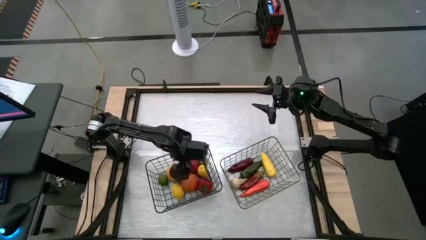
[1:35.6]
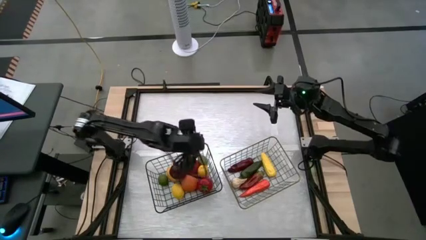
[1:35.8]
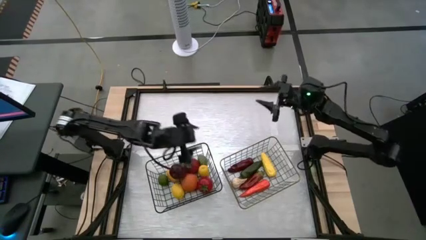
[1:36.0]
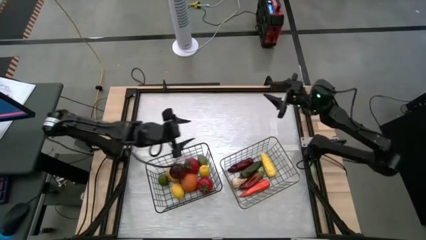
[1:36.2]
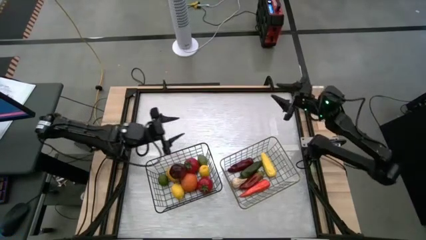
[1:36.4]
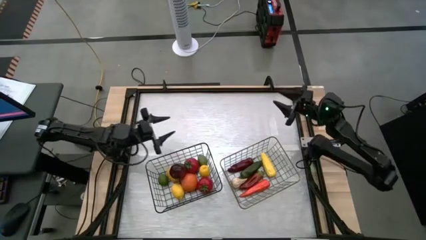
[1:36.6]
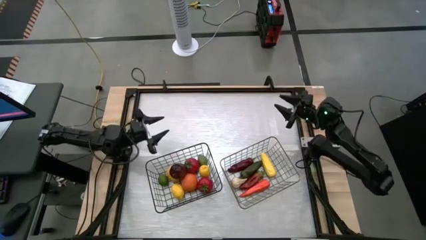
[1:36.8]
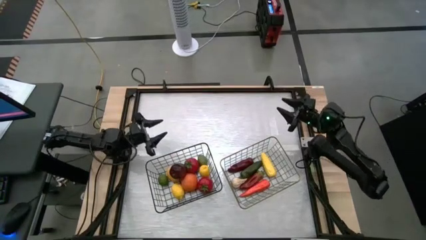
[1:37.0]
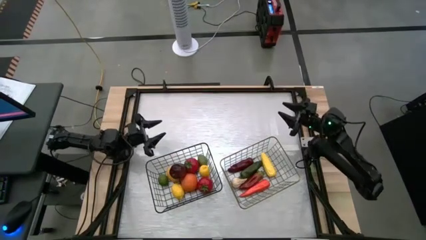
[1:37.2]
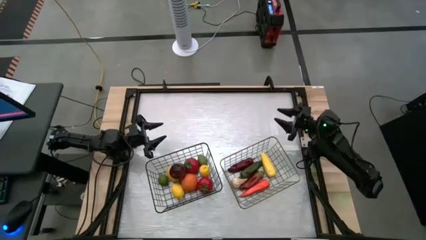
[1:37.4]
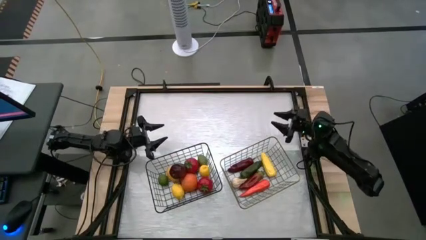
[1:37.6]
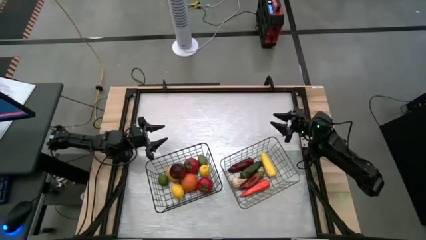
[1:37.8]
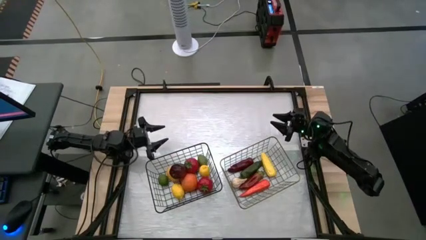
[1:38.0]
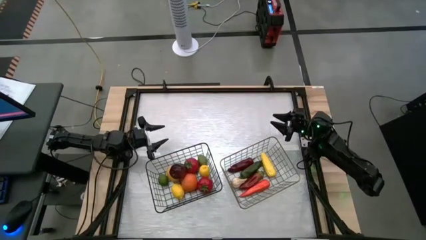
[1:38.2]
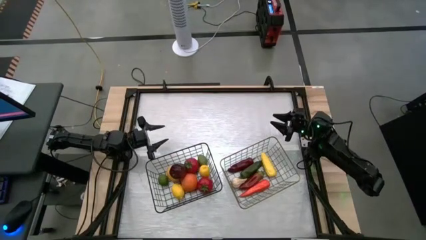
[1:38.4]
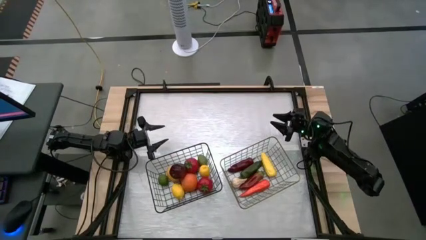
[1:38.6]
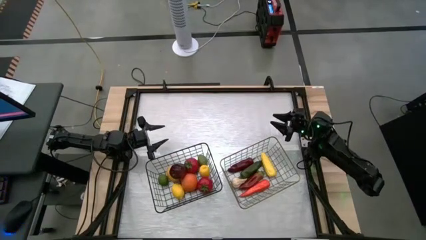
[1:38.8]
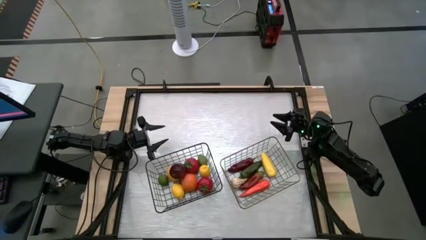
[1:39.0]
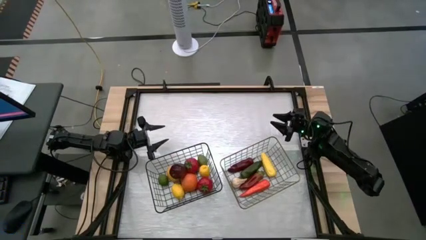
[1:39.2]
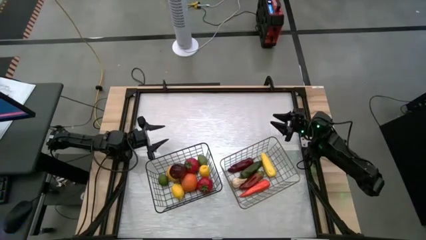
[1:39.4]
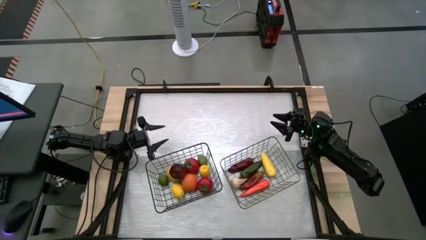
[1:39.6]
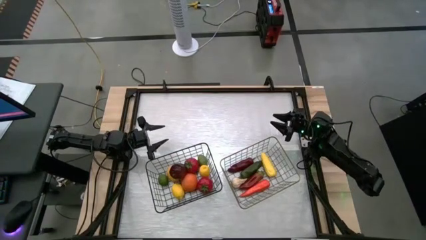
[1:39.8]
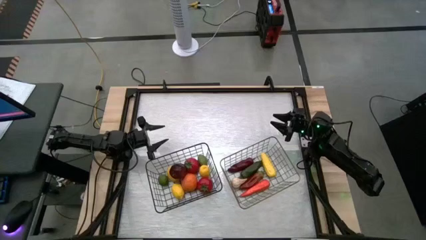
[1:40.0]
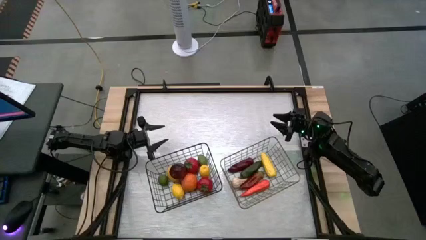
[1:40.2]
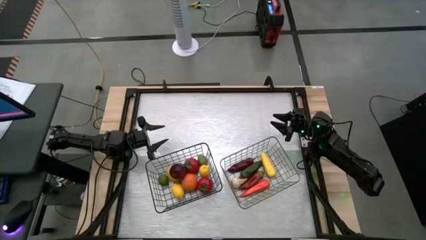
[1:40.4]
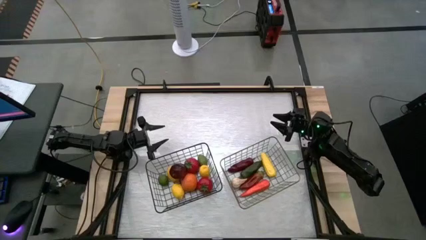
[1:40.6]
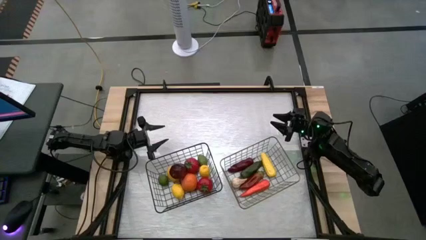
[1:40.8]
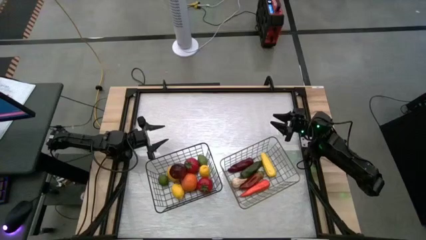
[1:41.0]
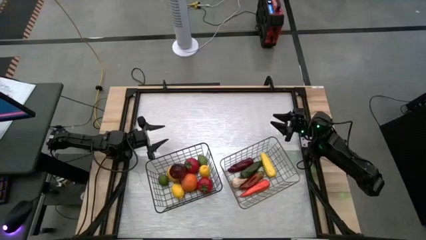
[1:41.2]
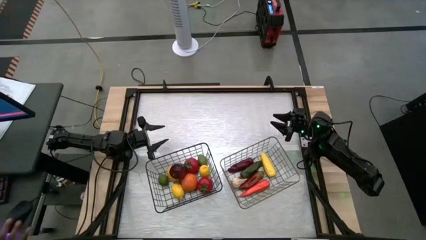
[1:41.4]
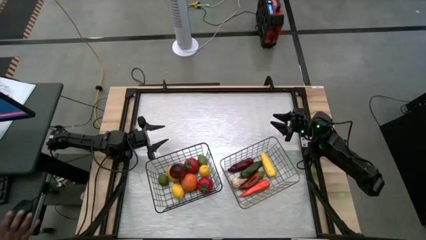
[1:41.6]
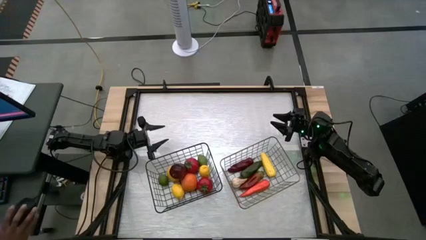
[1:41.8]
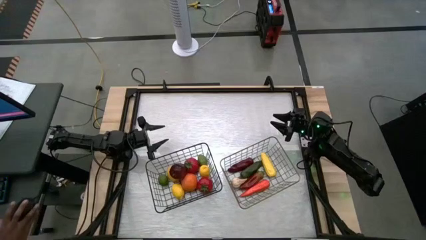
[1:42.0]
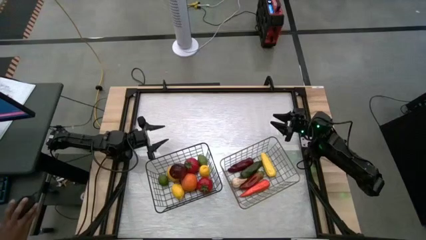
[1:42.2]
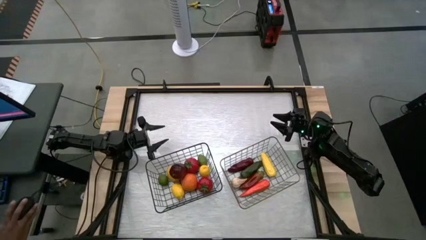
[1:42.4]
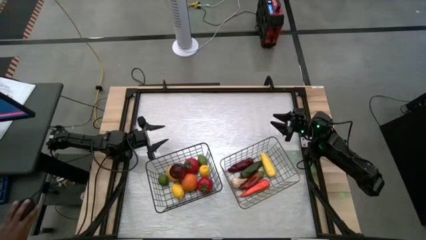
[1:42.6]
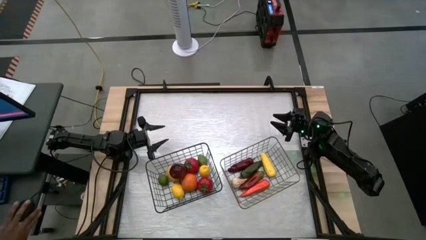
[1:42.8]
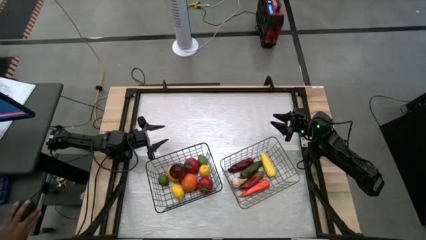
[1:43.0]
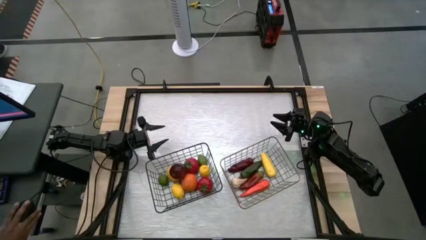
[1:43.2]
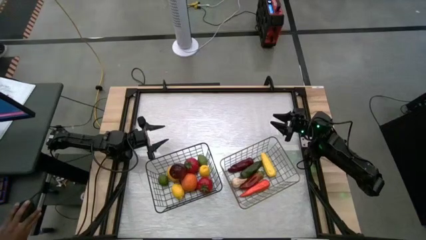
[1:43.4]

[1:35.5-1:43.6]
Task: Sort produce into baskets
Return to Home Position

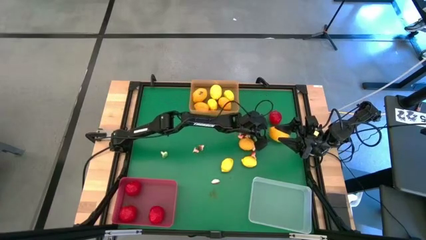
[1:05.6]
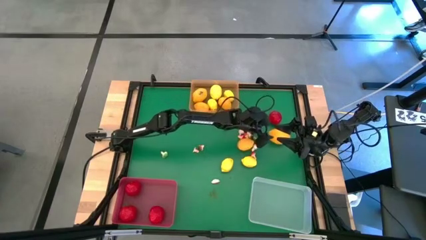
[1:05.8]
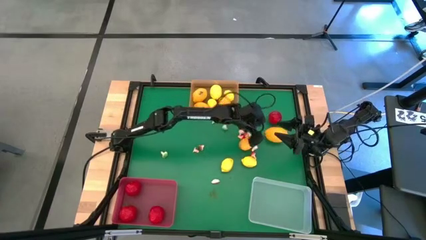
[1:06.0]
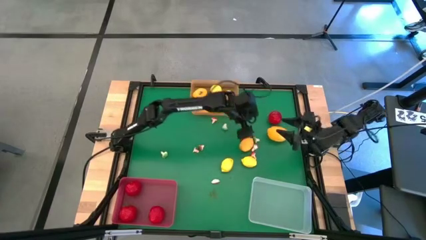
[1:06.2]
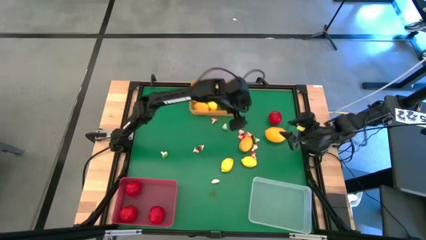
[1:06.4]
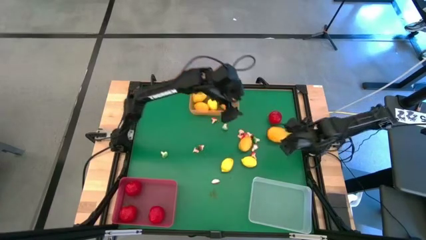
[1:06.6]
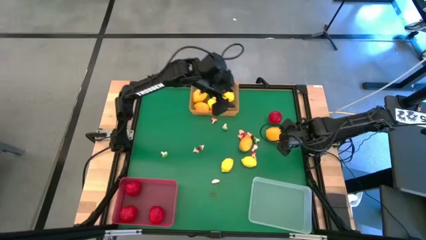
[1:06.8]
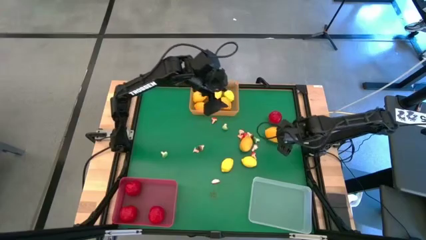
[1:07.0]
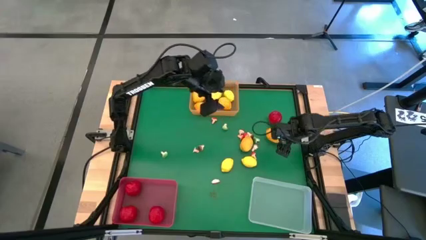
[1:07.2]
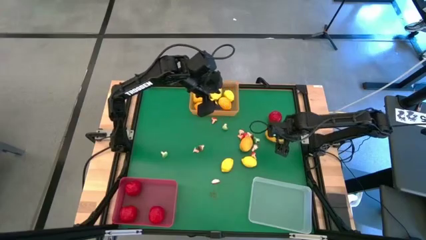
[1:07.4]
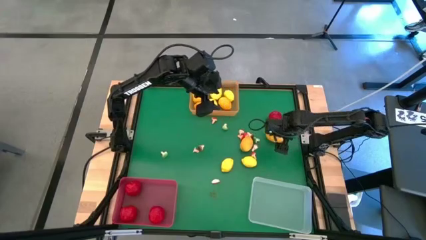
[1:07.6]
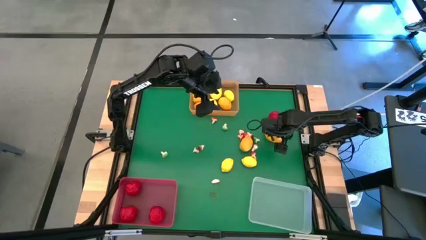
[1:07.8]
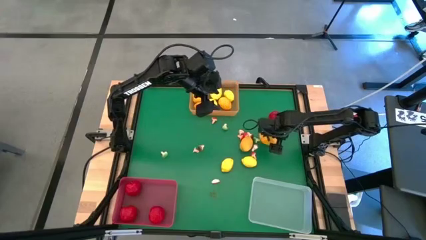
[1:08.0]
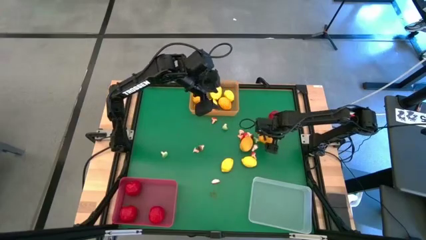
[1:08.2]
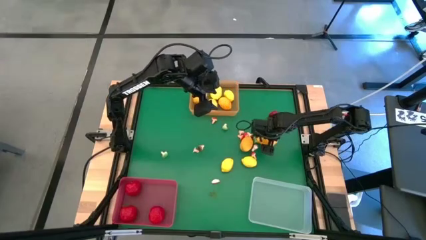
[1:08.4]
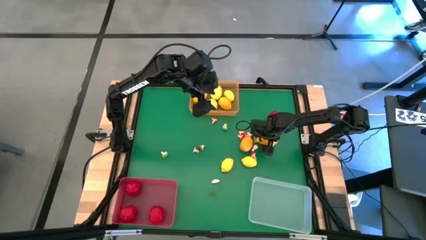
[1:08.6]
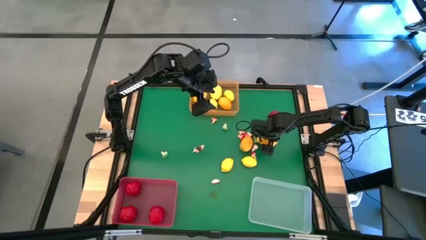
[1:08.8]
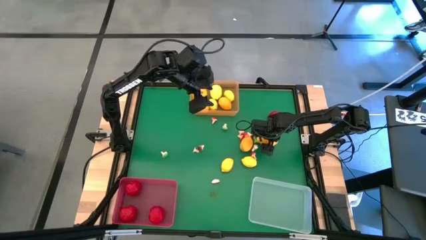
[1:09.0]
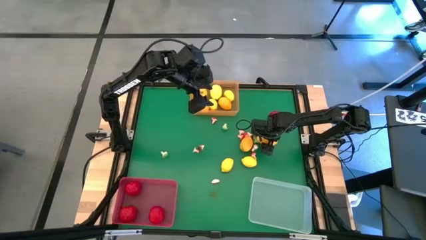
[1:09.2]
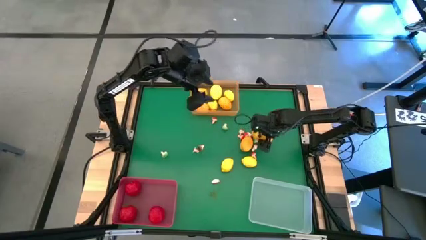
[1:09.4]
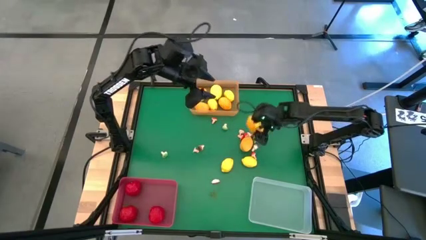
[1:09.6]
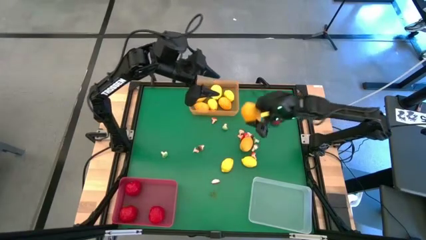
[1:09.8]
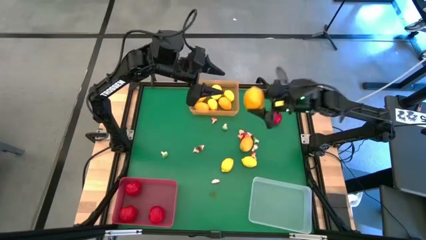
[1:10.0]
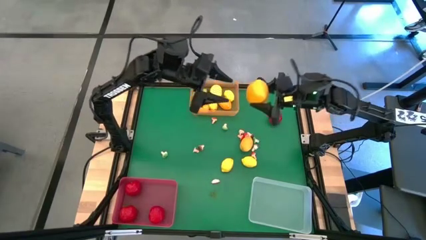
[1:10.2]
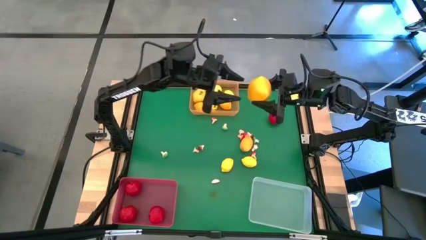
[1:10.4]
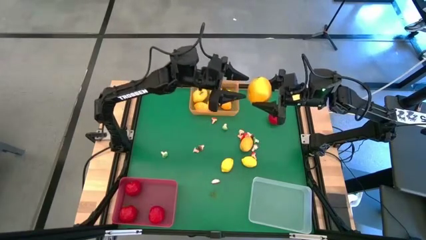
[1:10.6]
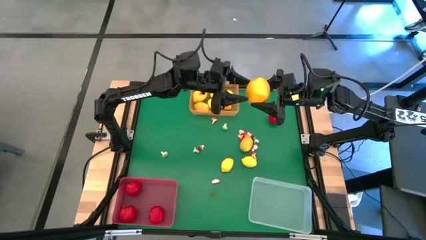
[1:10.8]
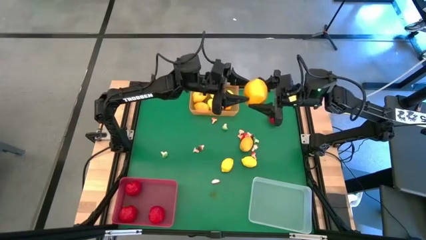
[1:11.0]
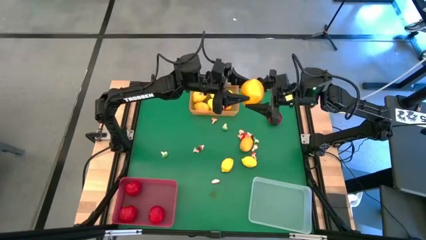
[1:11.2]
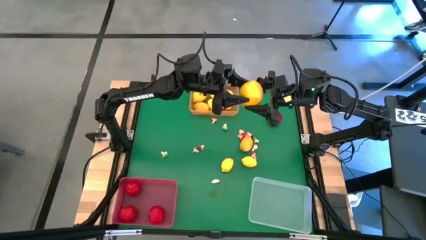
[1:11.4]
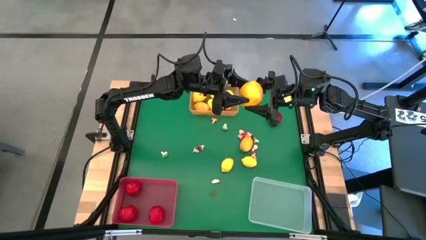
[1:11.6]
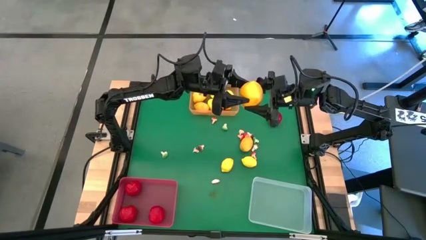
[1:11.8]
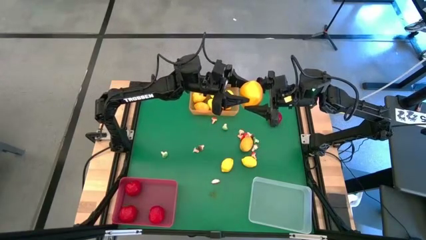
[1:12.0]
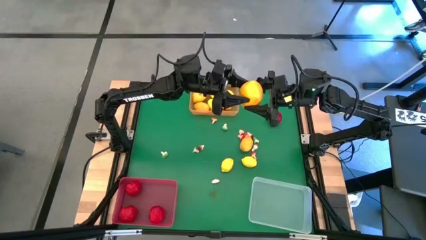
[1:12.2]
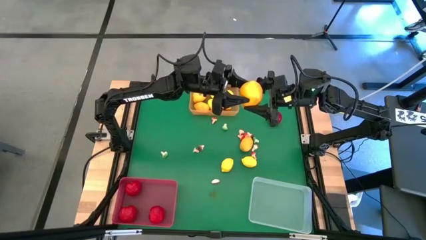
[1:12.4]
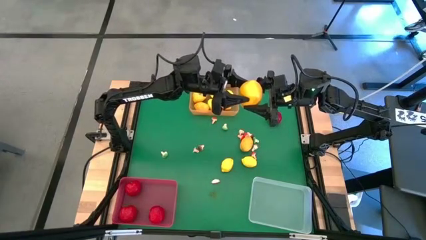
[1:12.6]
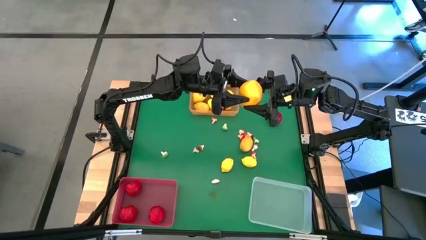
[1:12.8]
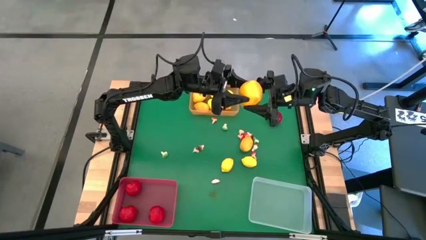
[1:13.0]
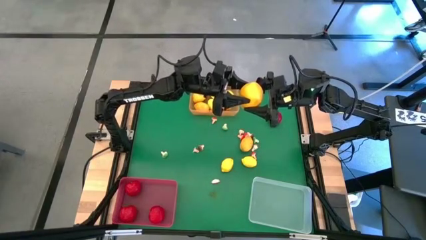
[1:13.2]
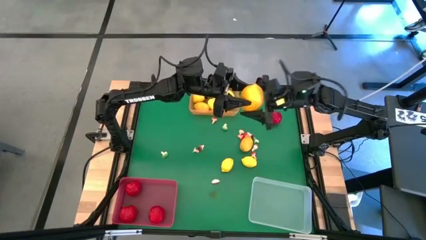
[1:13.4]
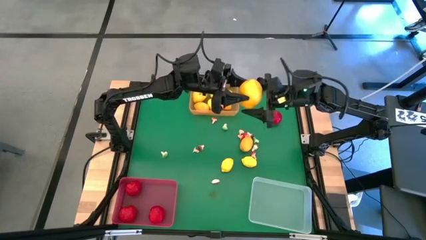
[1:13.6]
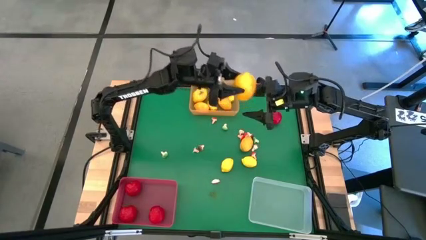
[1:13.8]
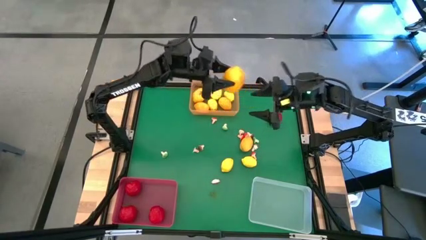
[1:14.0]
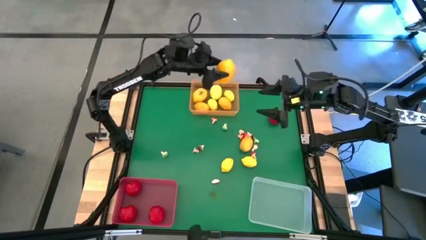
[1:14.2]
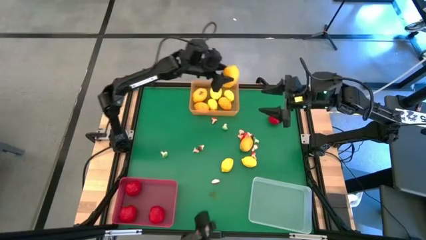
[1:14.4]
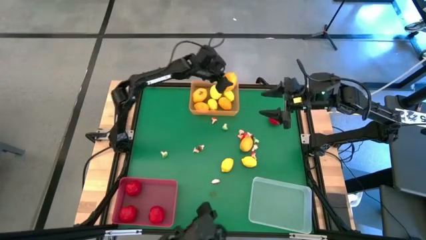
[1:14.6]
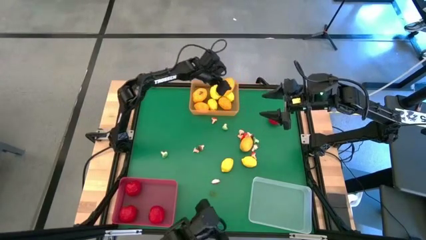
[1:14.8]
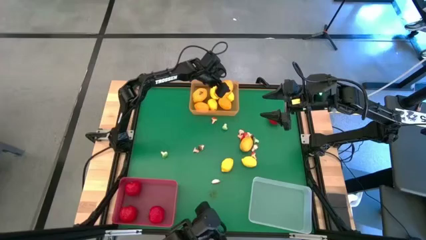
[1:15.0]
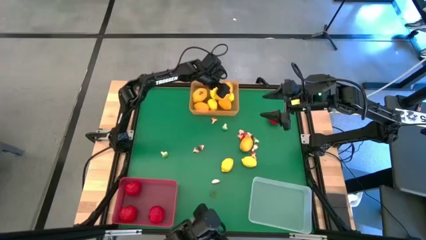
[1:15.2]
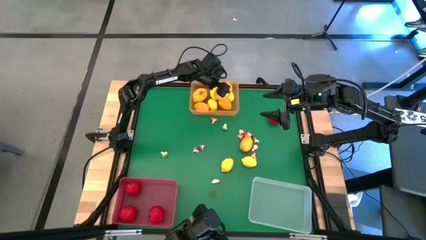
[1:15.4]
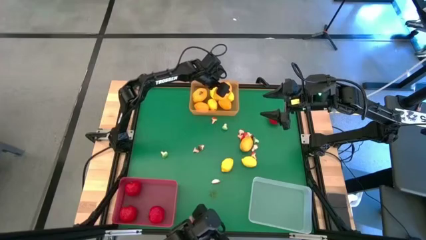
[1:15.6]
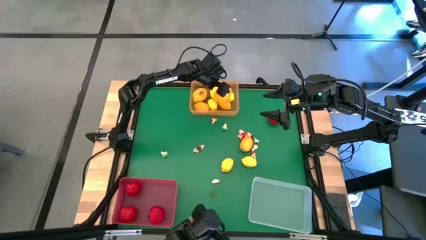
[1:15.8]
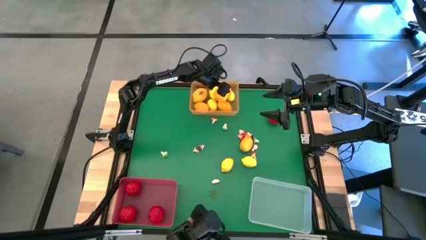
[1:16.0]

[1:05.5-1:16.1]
Task: Sort produce into baskets
Put the mango into the orange bin
